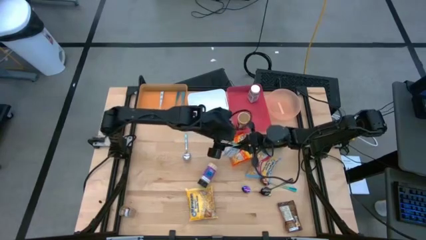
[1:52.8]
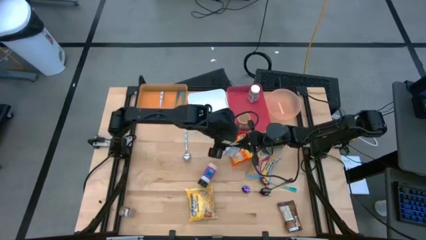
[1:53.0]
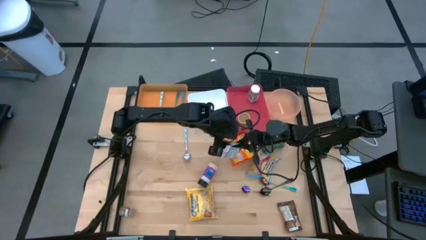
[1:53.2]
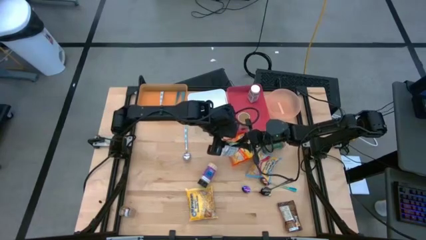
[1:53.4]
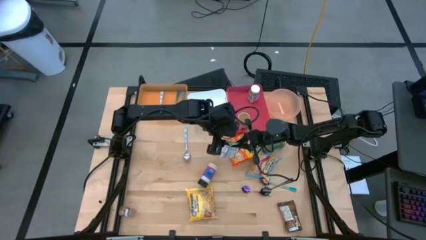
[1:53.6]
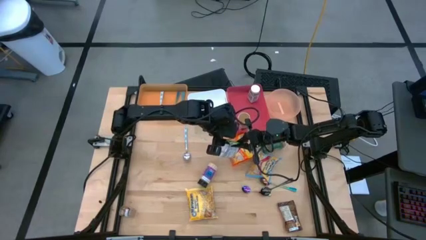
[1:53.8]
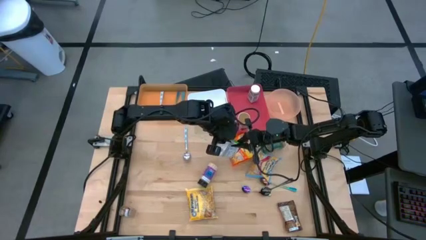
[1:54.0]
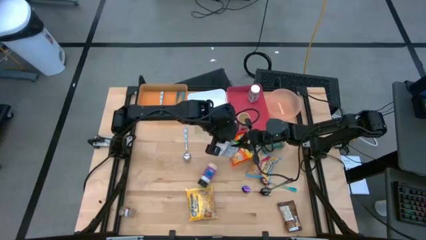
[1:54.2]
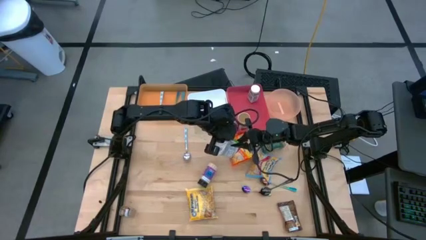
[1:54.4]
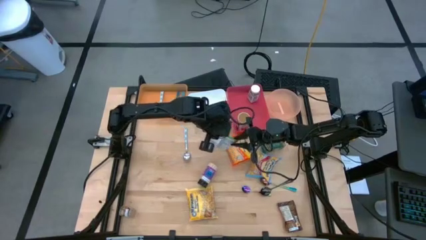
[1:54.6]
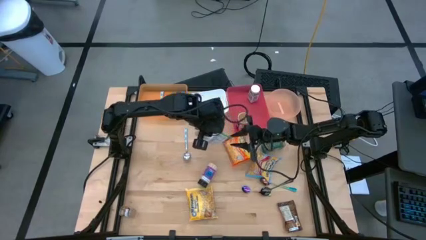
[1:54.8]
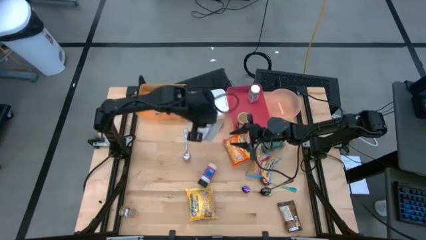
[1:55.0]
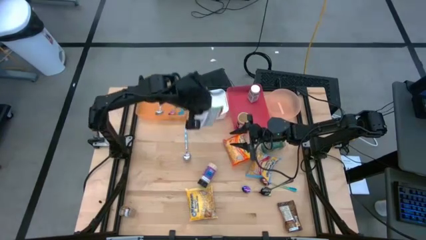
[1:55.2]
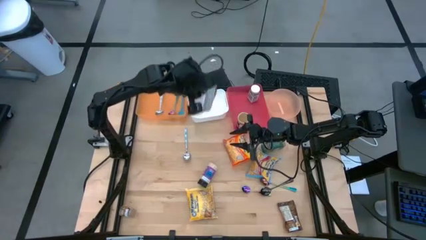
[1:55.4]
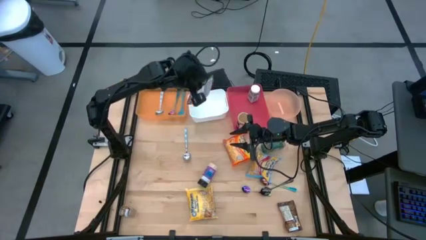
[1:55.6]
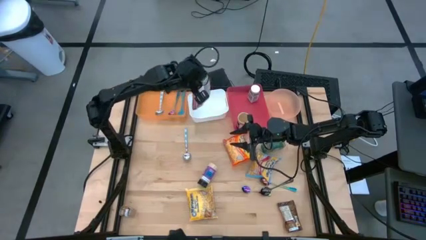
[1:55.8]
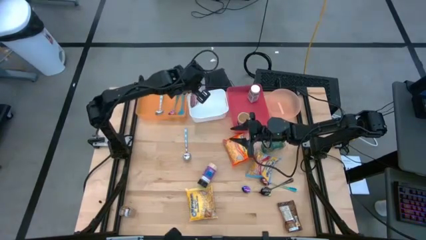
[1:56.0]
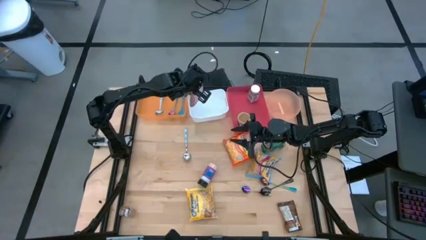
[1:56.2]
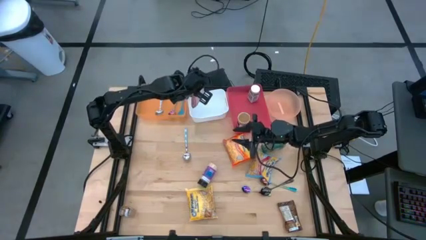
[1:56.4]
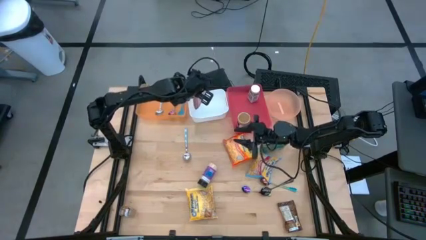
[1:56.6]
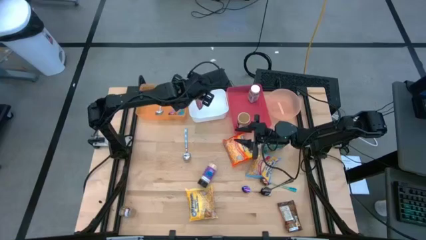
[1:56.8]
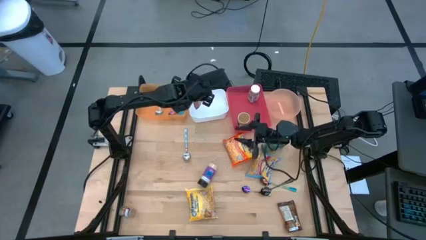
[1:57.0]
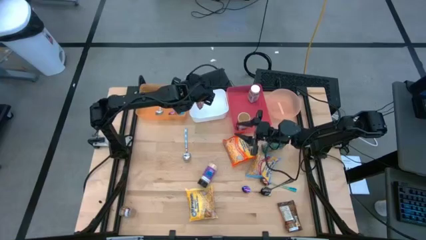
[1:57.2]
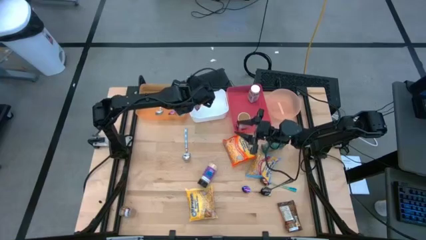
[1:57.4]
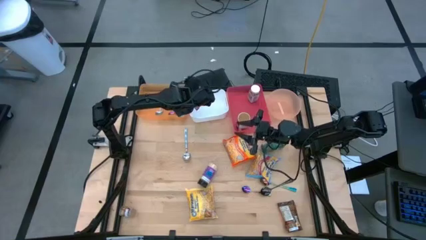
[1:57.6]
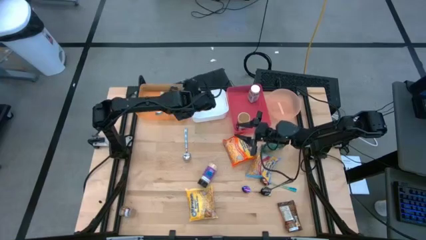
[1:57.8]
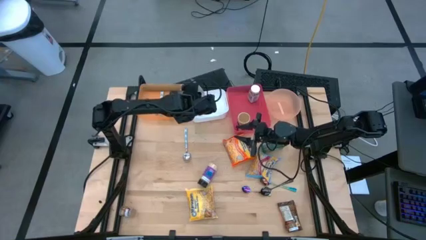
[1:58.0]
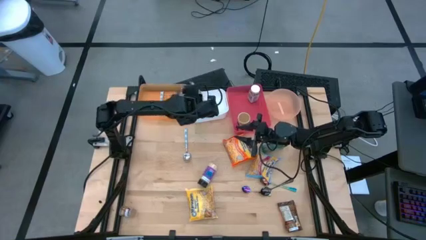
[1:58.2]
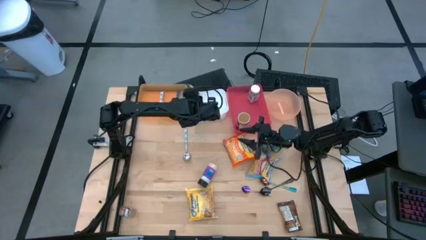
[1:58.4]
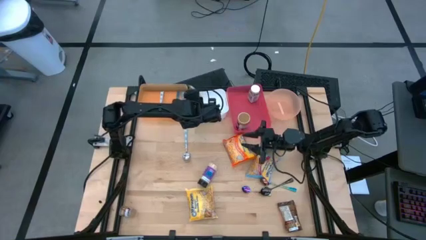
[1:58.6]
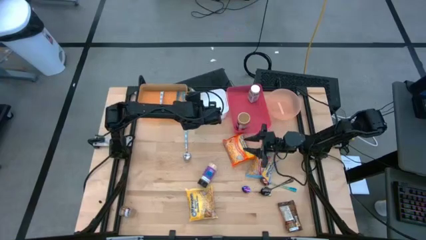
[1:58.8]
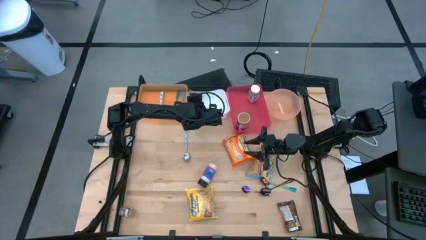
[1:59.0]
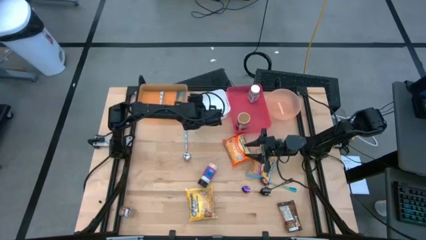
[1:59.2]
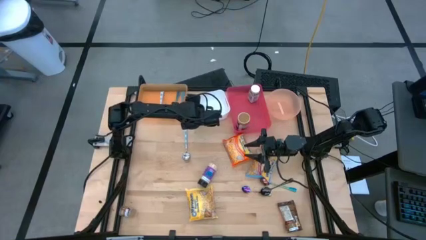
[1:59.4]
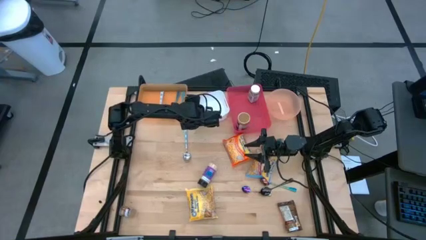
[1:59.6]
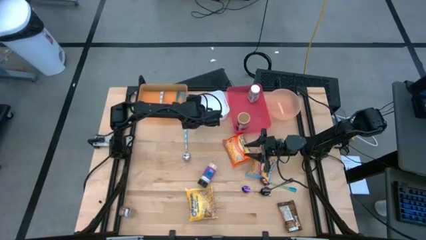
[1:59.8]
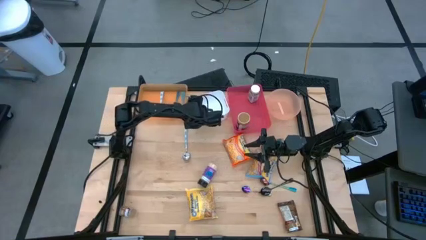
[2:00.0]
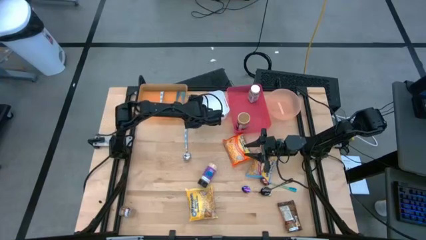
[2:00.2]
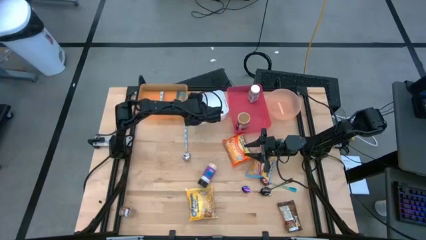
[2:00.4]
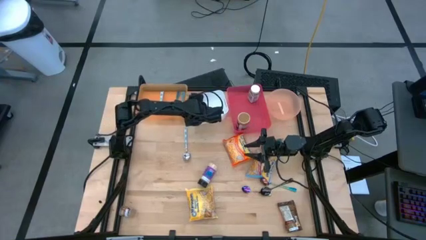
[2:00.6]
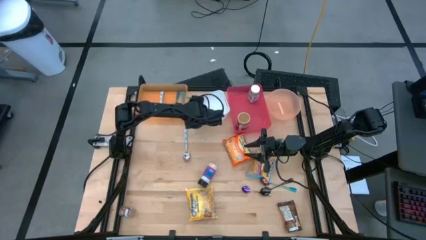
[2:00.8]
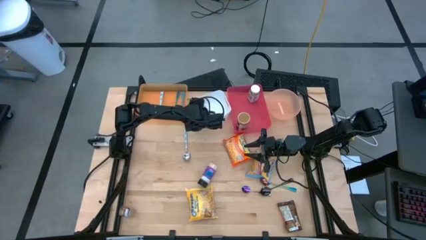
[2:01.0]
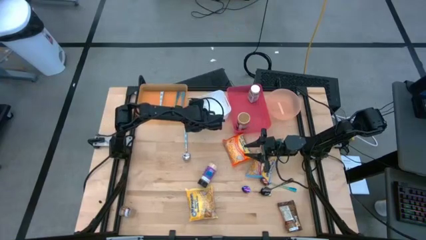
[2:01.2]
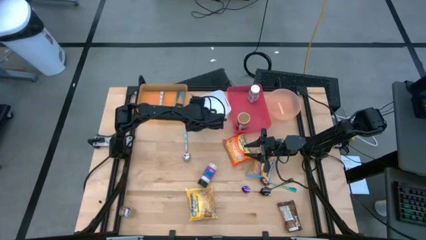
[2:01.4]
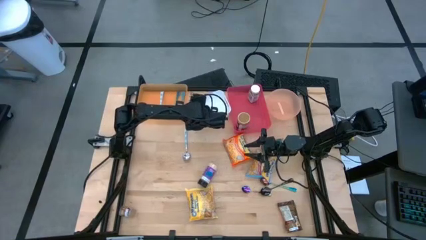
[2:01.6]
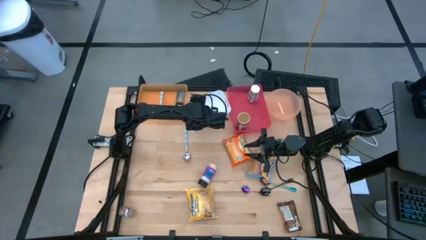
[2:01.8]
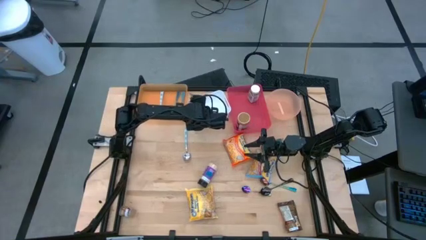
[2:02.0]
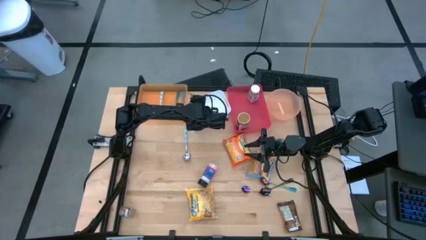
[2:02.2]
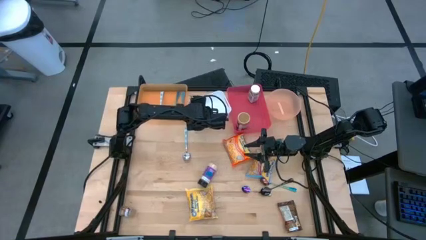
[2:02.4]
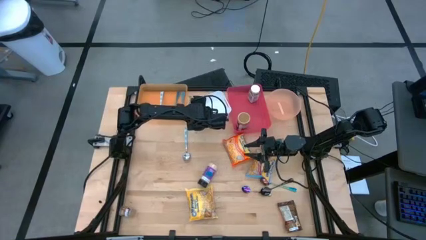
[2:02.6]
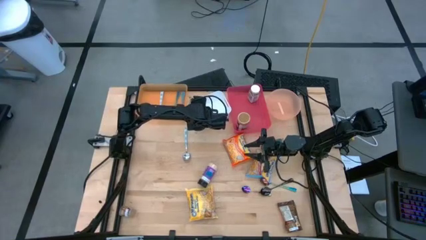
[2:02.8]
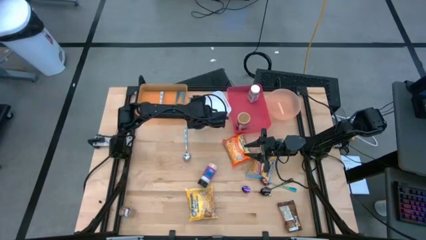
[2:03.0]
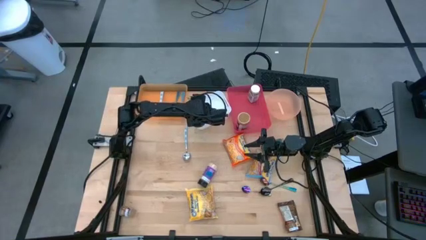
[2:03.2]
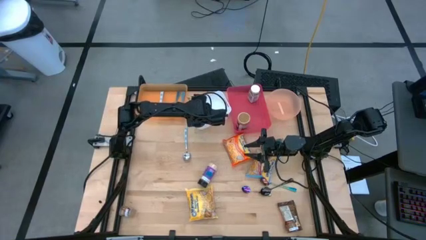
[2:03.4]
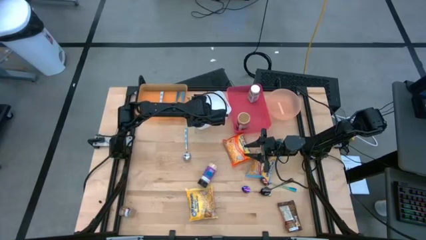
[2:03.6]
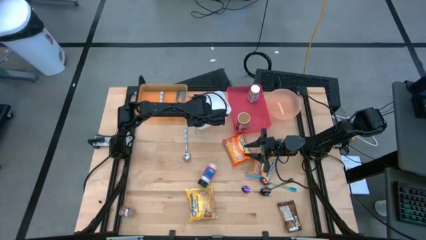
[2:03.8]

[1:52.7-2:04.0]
Task: Pick & Place Food Item
Put the green noodle pack into the white bin

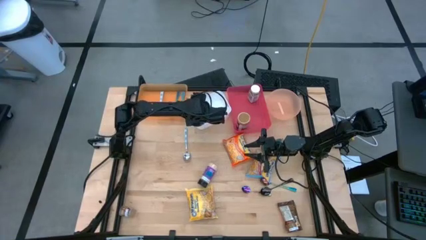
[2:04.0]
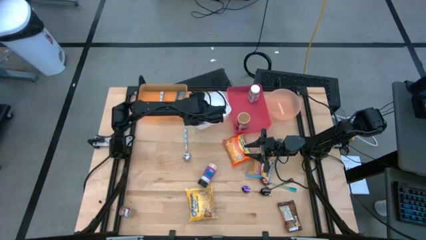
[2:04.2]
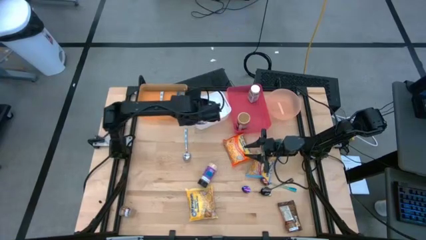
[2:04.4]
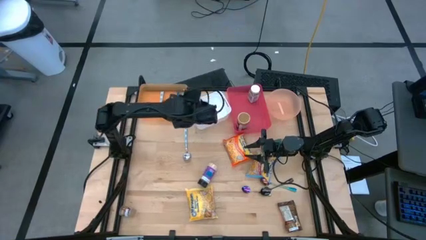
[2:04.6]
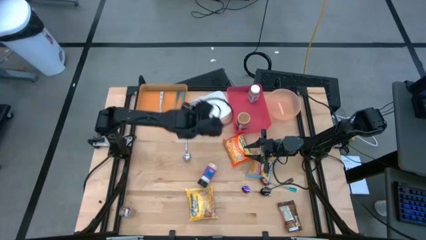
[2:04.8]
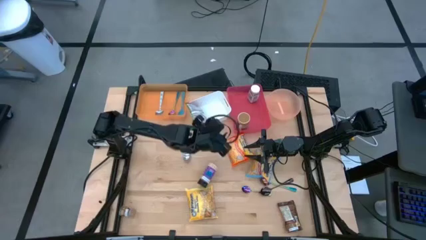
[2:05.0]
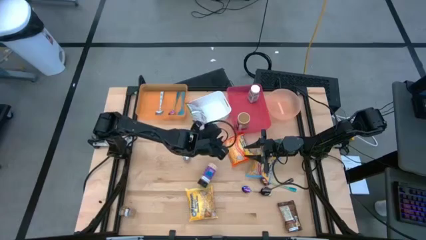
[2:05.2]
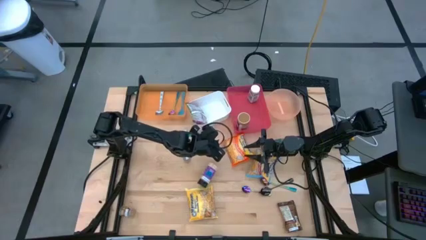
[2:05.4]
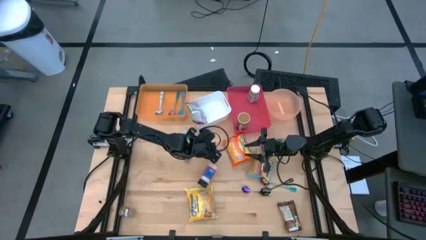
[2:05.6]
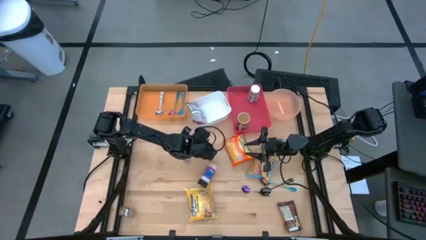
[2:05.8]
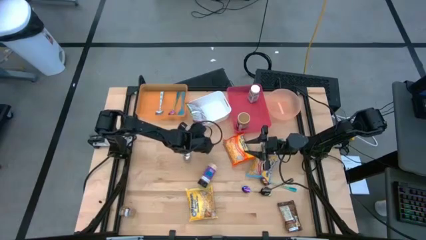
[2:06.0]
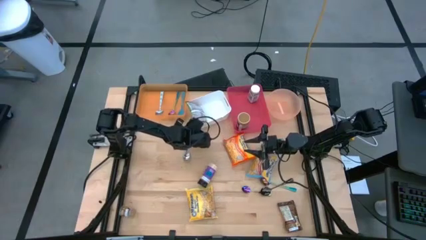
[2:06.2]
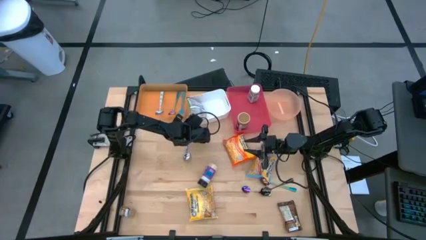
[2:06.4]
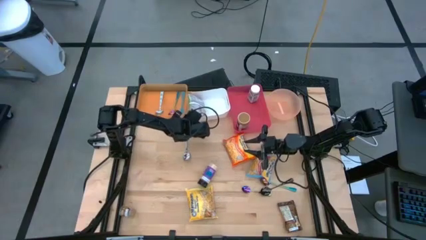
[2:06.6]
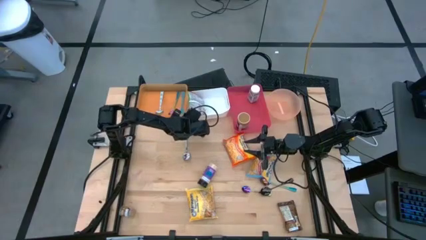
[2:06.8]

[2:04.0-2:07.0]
Adjust the white bin
